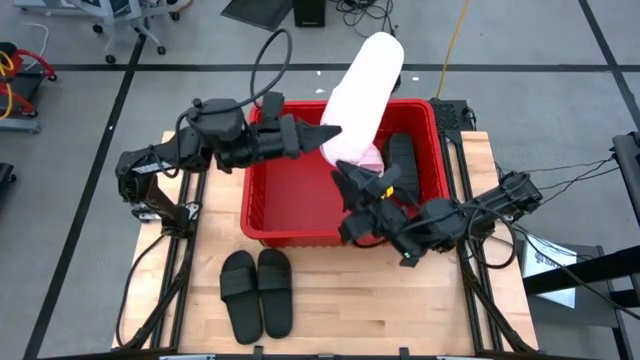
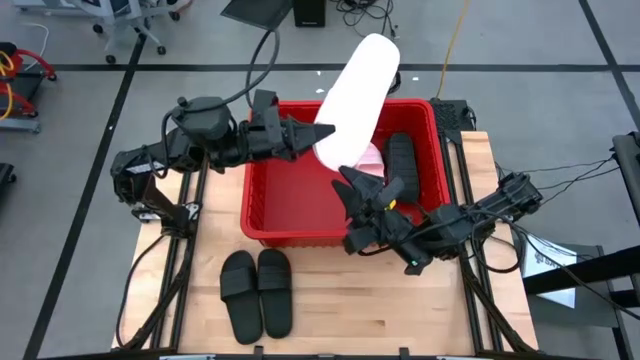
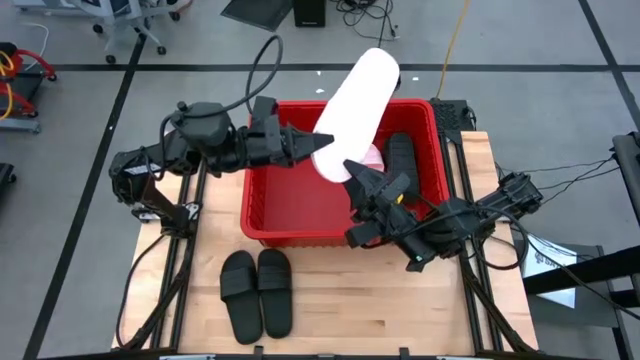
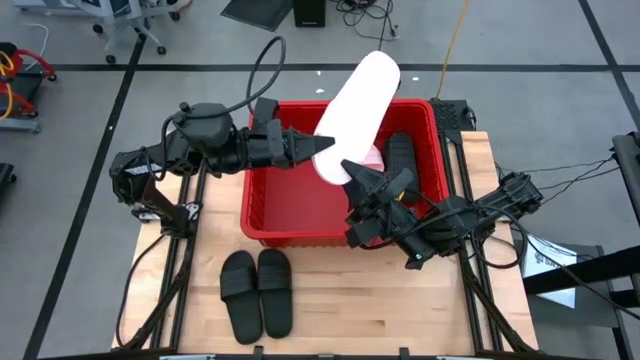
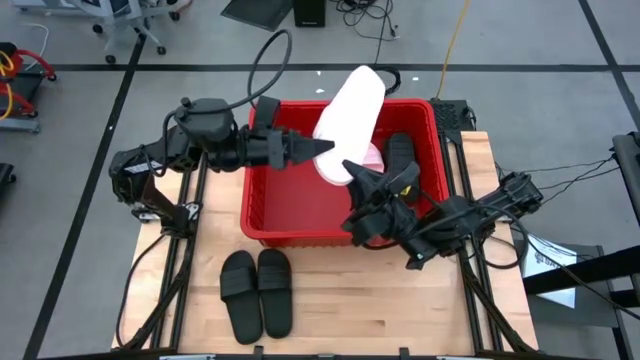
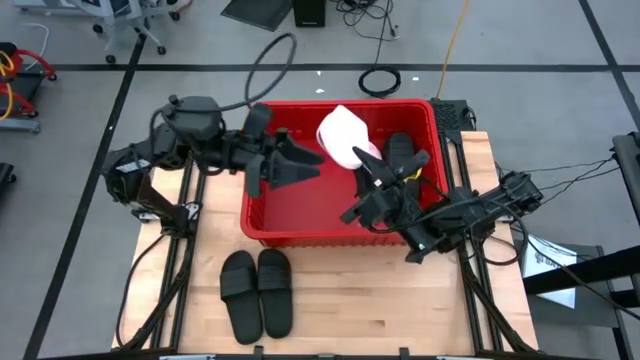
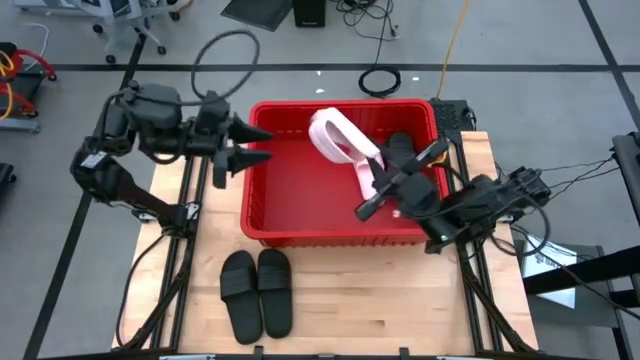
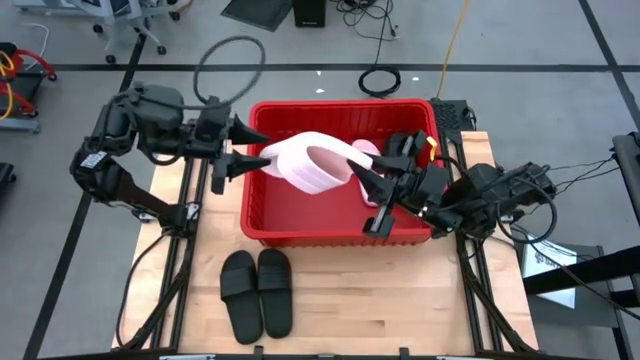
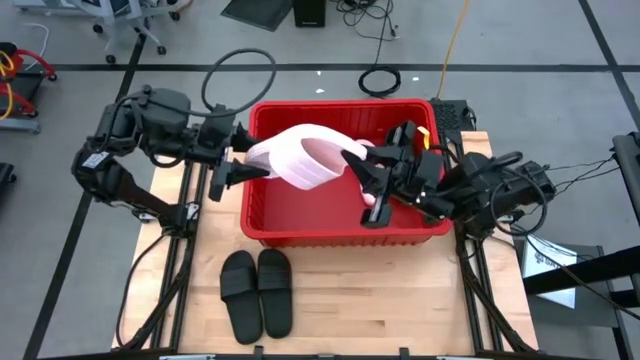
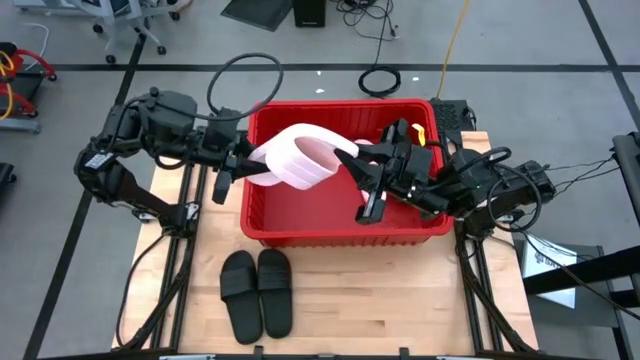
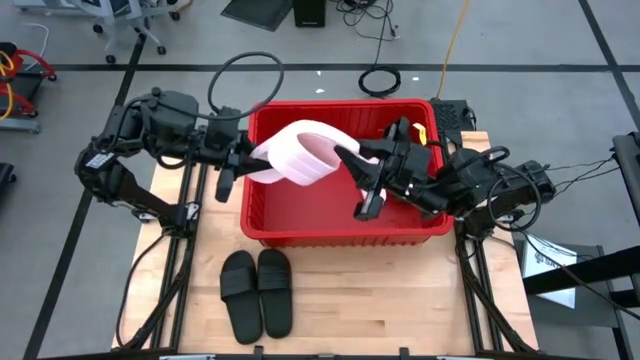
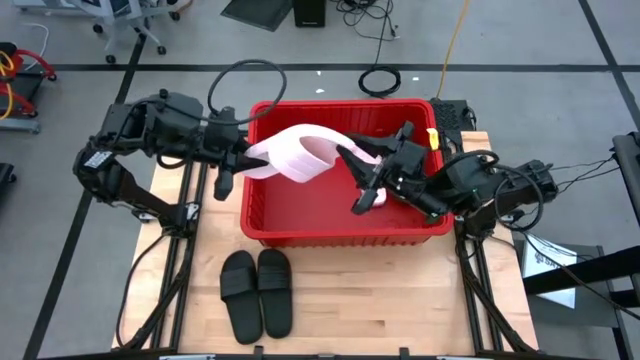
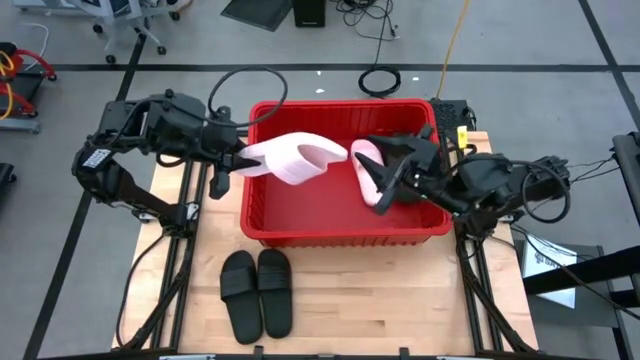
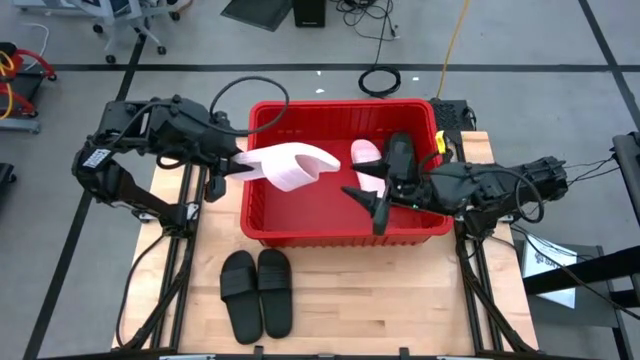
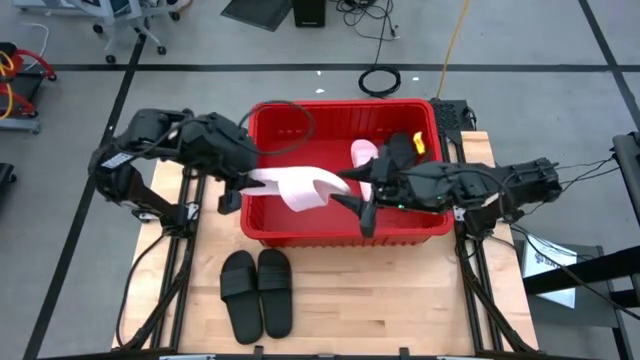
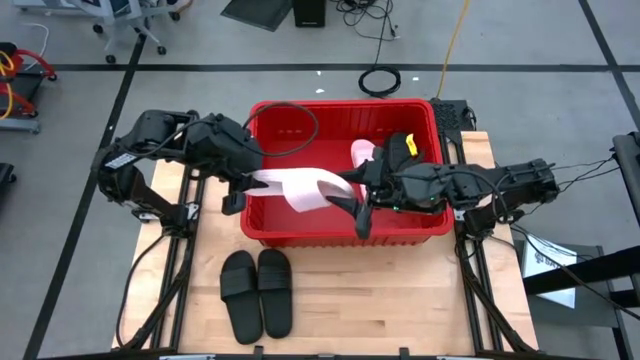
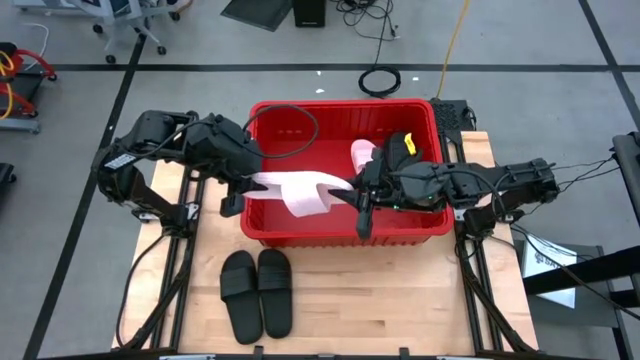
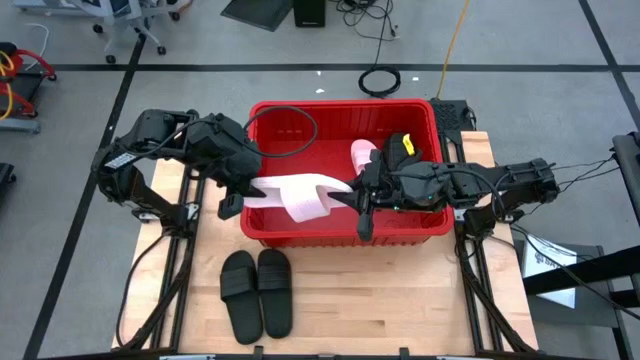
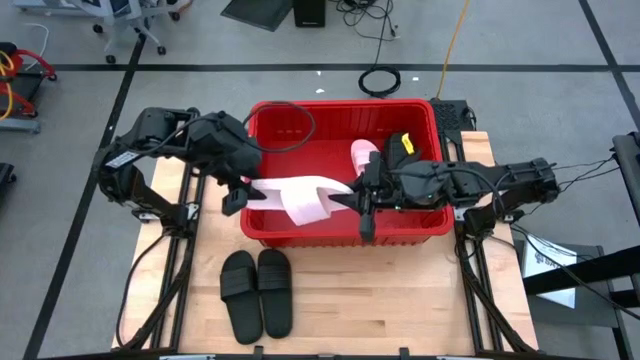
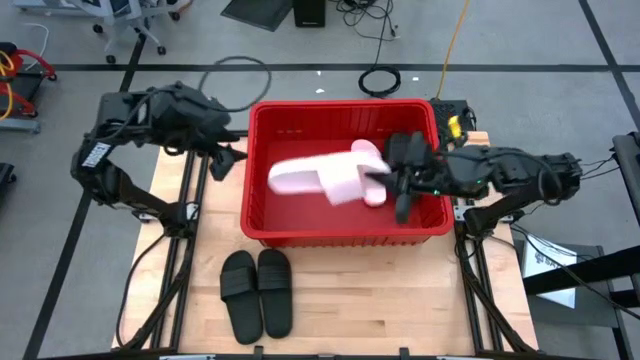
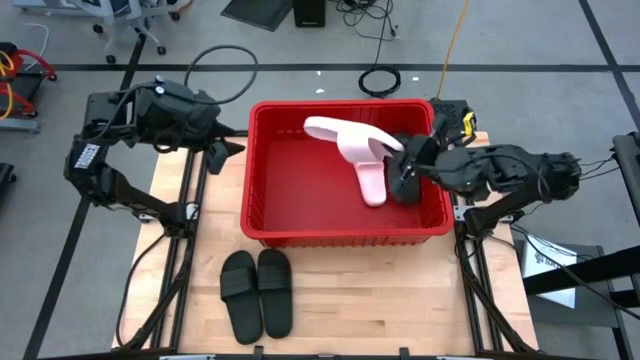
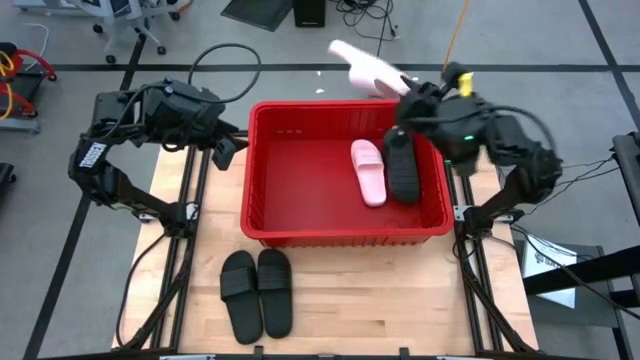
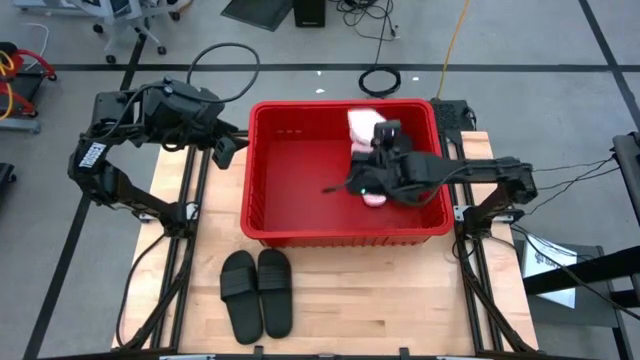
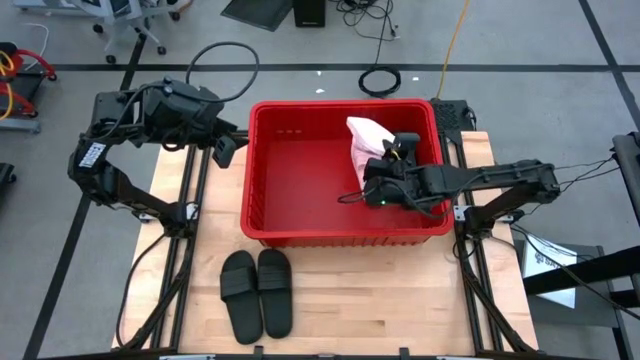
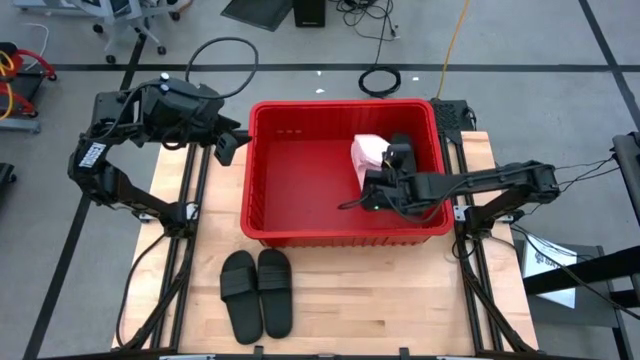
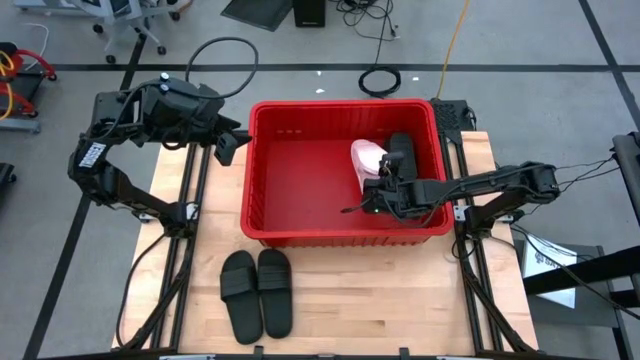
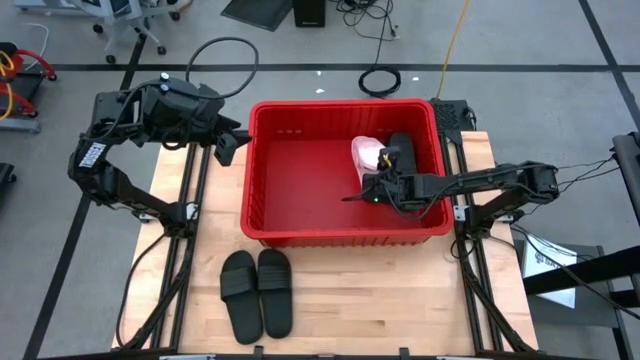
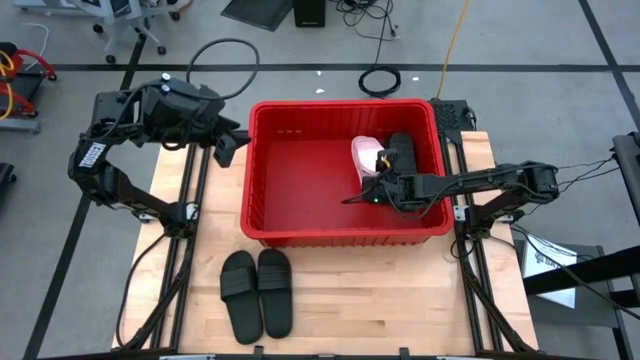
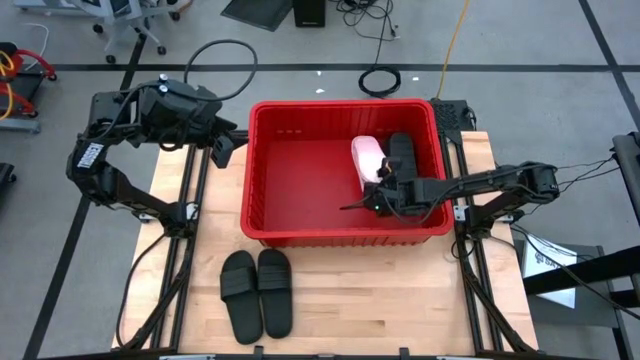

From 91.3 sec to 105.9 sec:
Task: Pick and place slides into bin
Put the pink slide into the red container

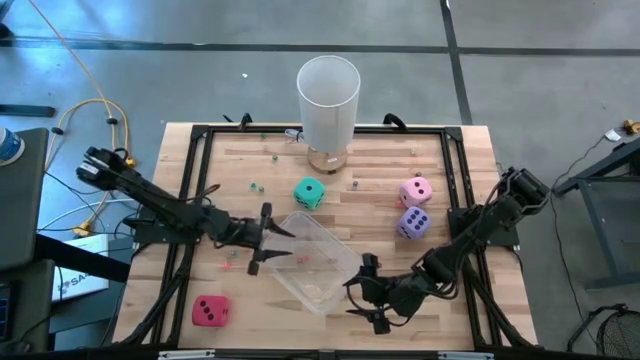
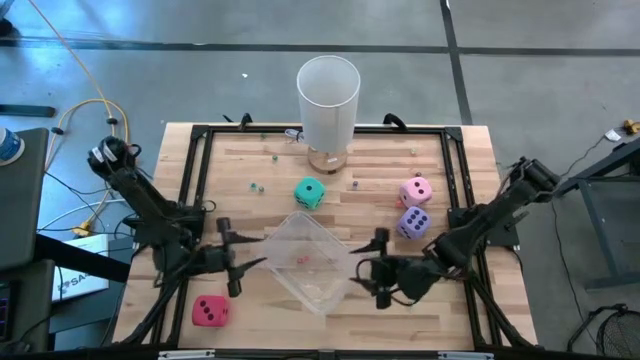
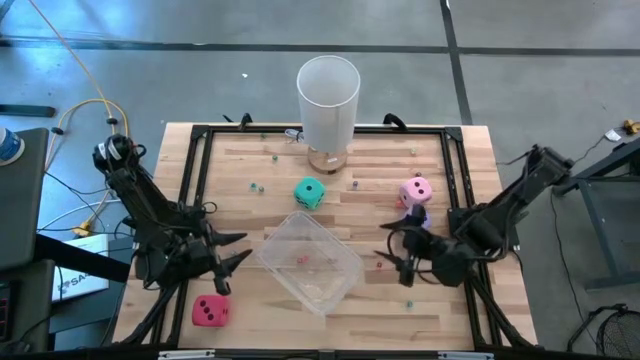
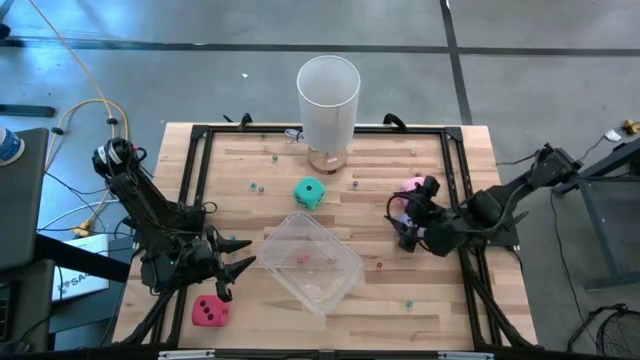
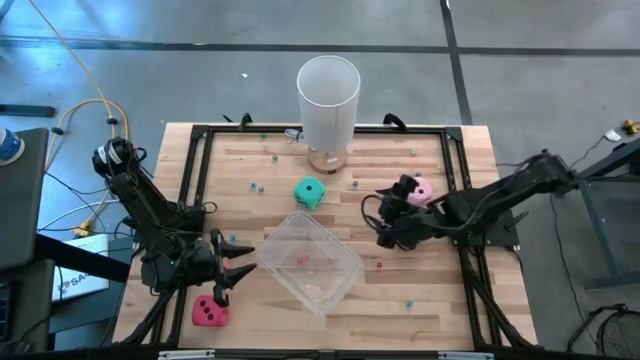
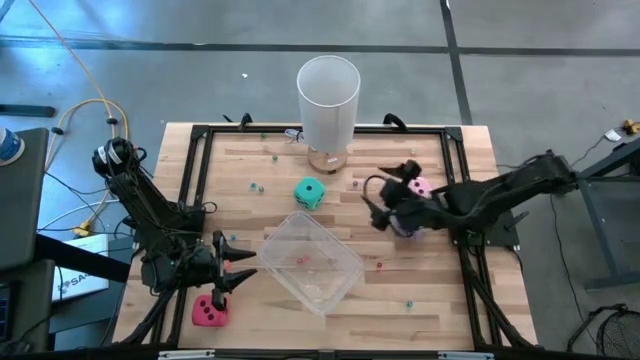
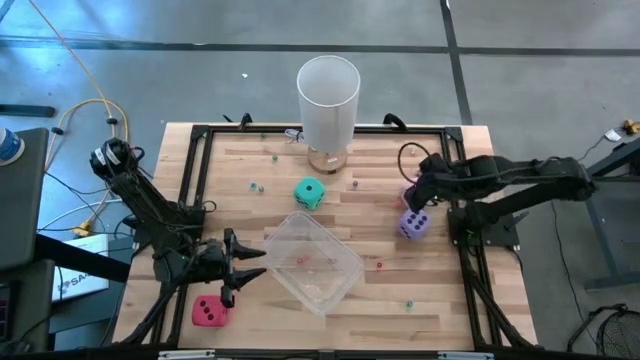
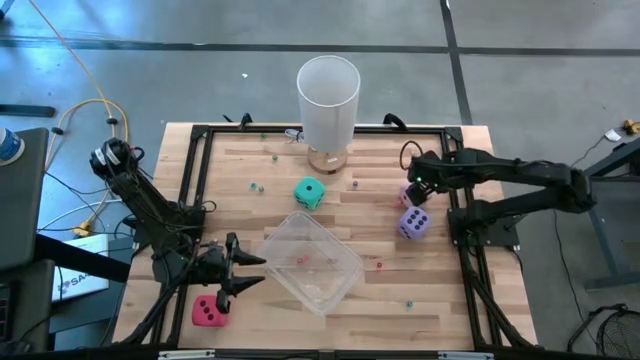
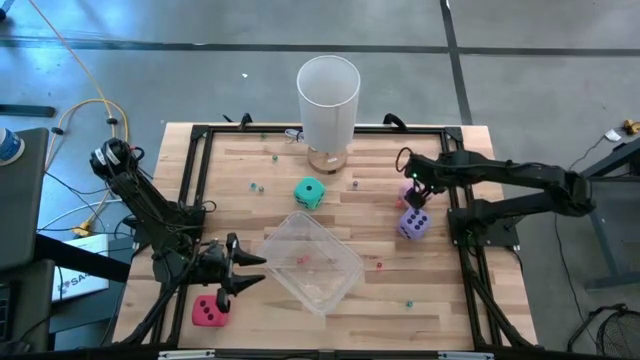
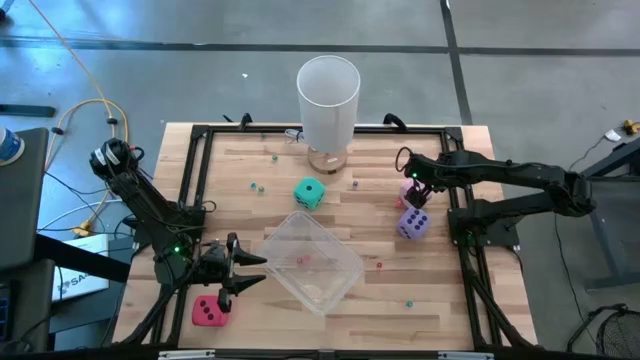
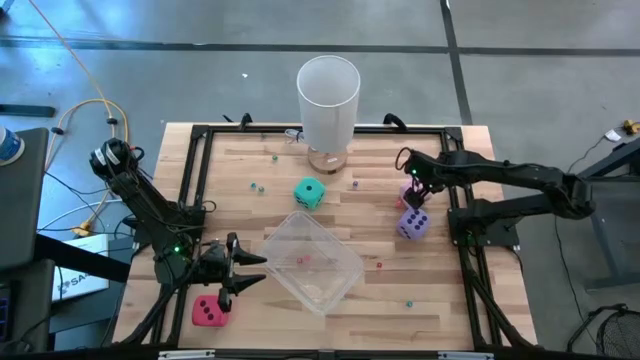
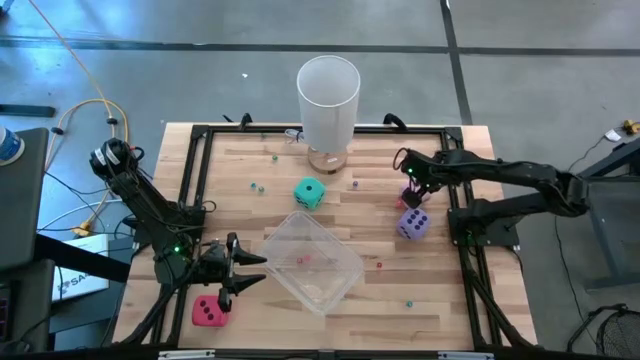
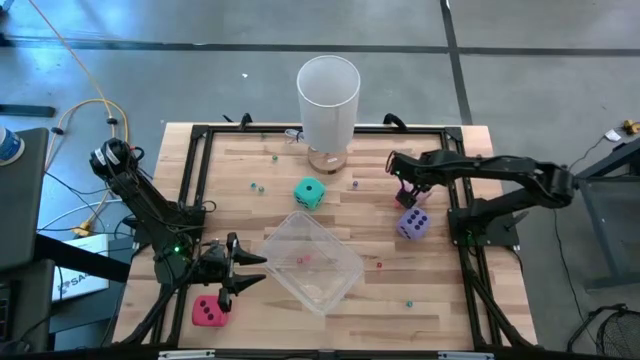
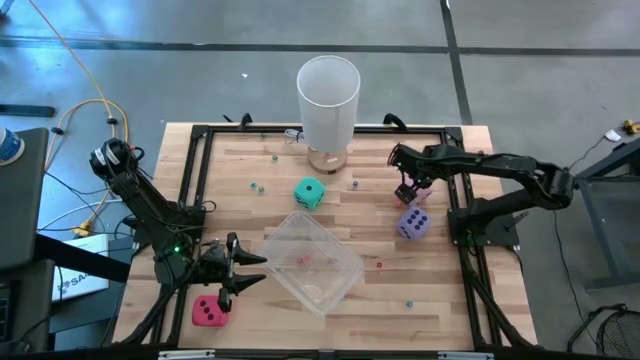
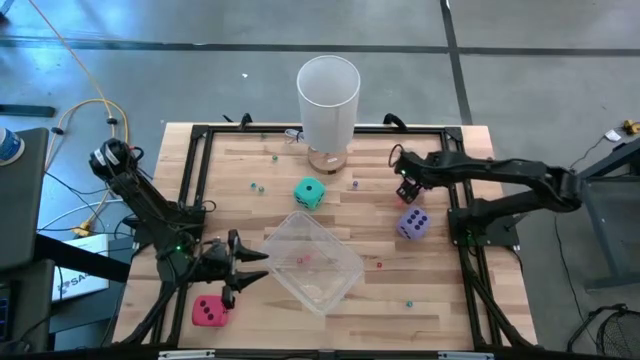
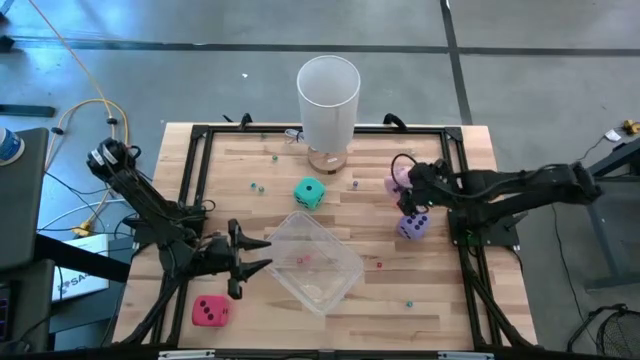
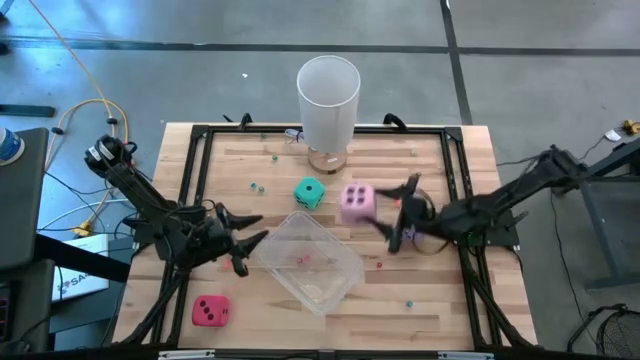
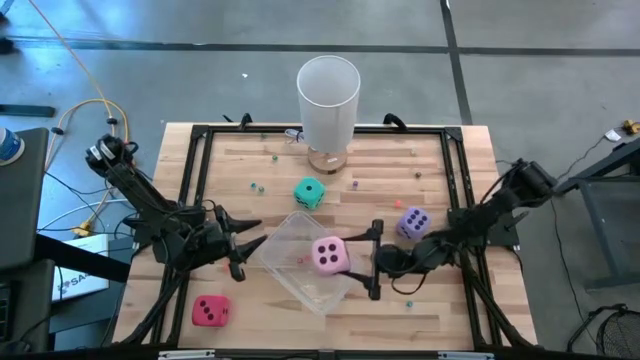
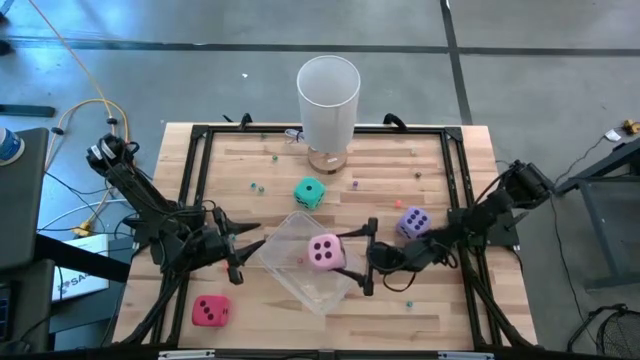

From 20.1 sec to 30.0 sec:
Task: Pick & Place Dice
Put the big pink dice into the transparent bin
